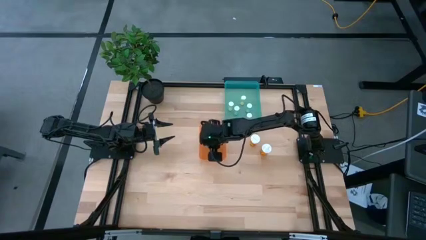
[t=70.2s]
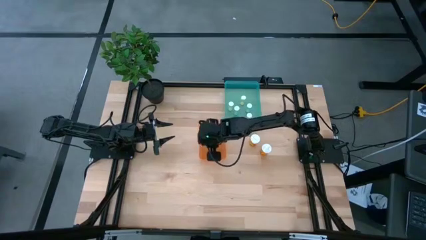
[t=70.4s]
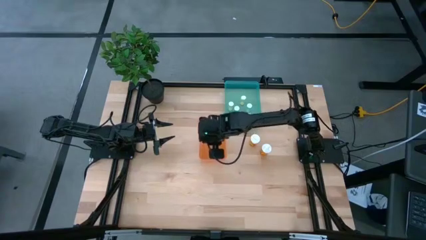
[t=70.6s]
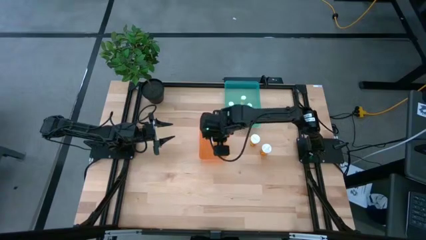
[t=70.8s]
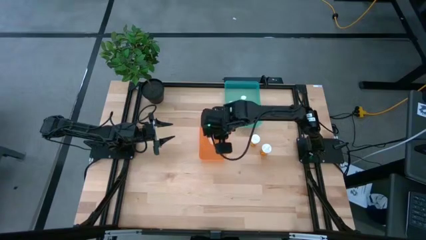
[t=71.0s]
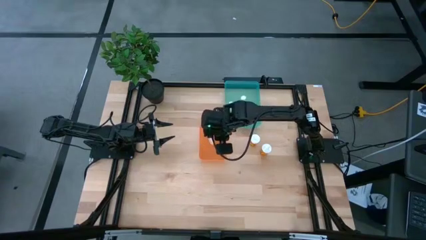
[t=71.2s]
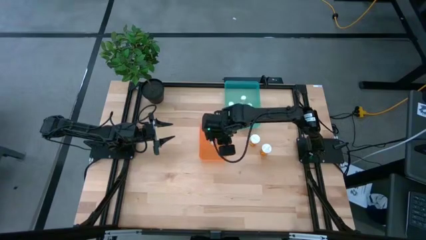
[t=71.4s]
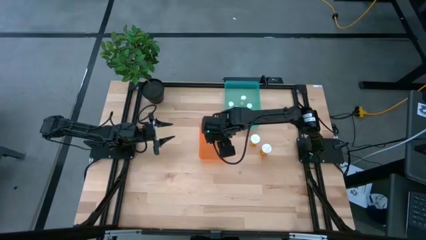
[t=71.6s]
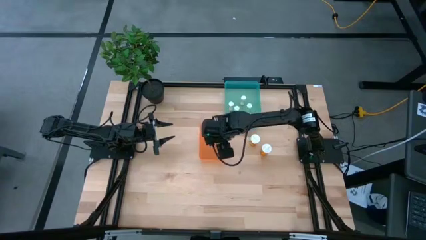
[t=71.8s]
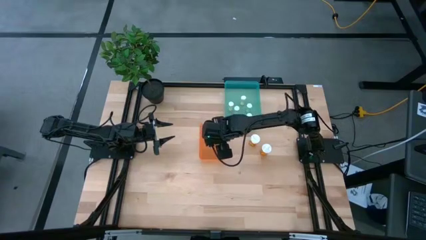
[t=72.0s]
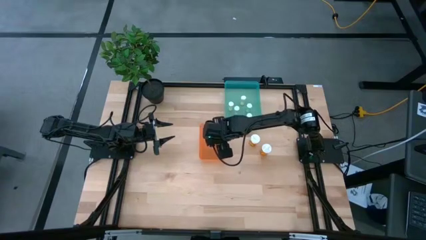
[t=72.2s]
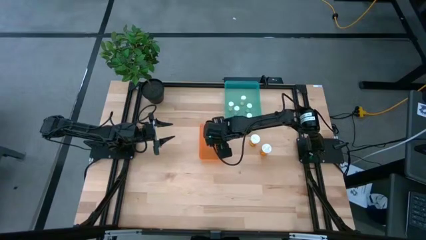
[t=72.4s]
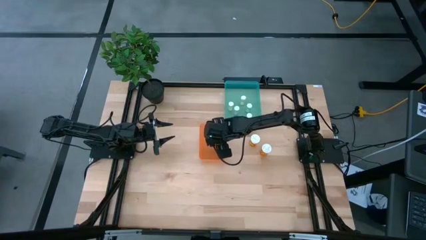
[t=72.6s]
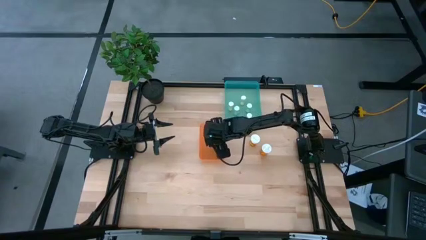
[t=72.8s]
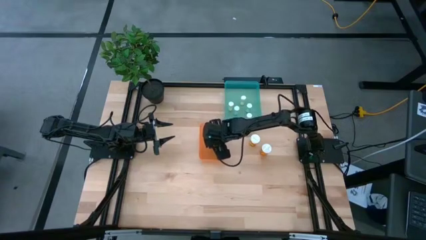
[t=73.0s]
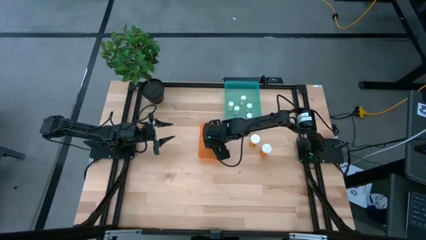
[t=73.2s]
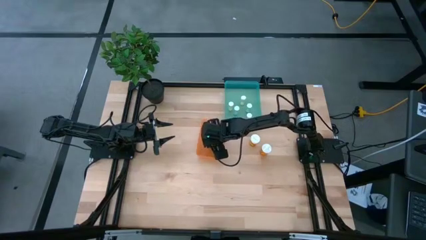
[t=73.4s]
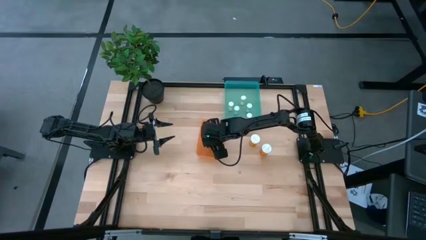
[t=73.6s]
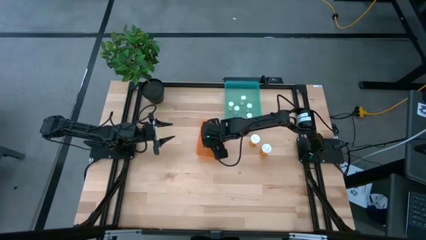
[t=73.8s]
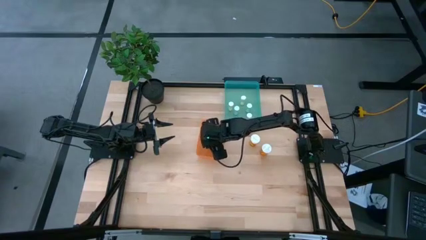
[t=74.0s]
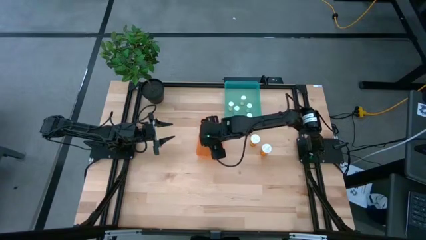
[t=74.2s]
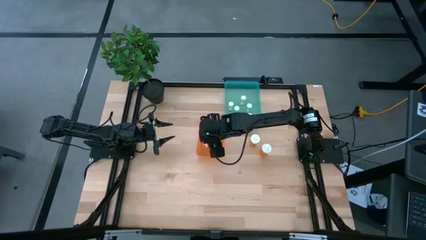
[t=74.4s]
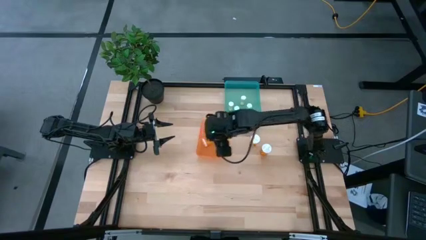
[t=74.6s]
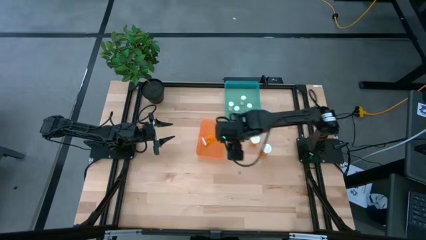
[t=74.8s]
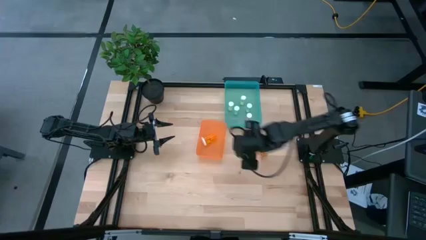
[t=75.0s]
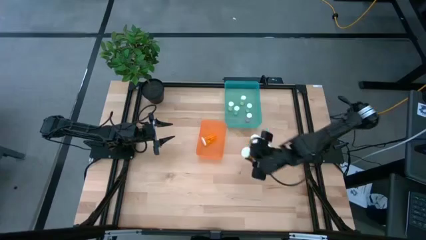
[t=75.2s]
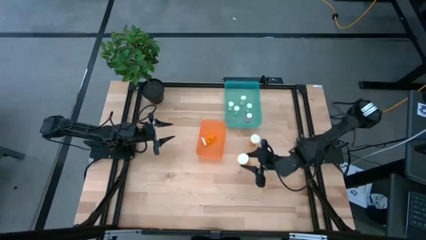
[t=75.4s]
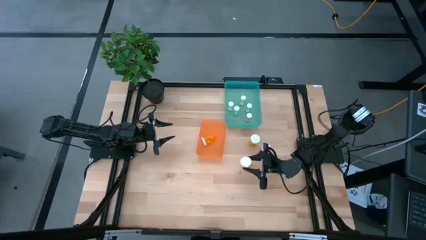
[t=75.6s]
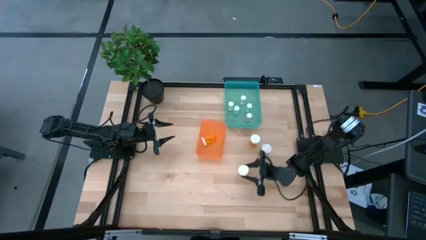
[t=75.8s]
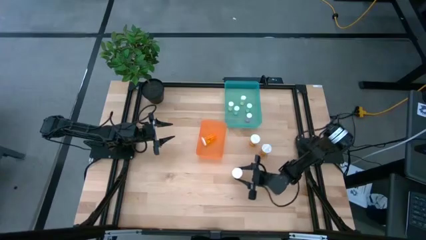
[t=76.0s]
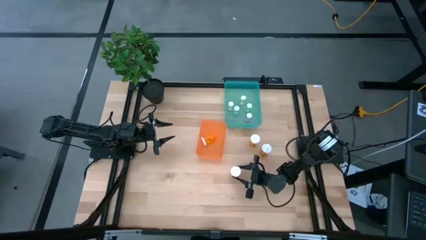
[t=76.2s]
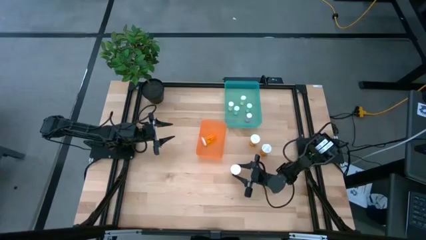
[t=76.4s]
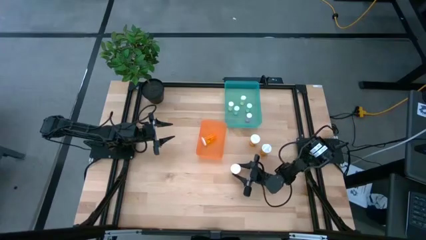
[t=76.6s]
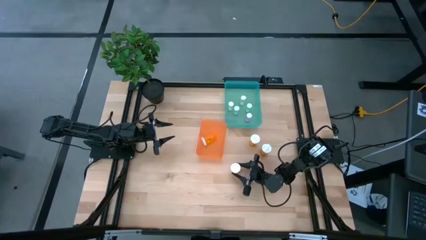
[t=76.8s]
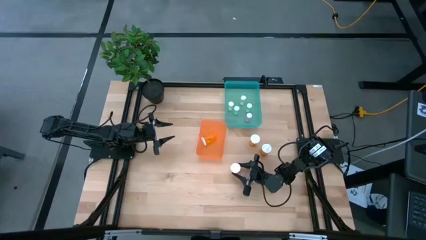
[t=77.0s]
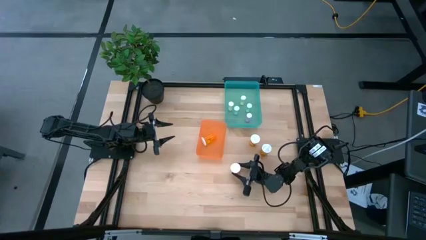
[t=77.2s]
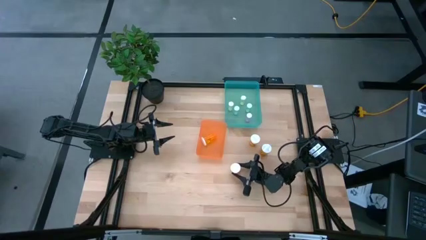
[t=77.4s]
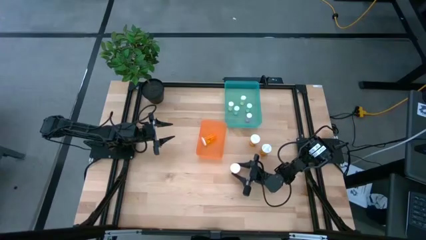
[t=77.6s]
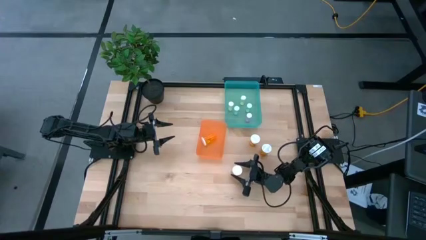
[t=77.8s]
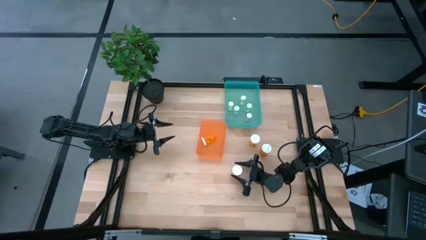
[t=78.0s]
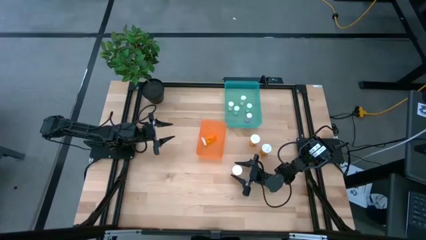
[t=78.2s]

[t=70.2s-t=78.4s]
Task: Pick and place medicine bottles into bin by pill shape (circle, oval)
Remove the orange capsule bottle from the orange bin

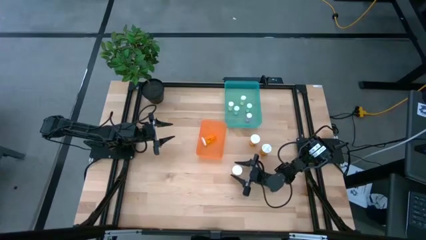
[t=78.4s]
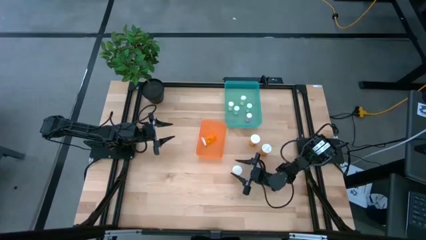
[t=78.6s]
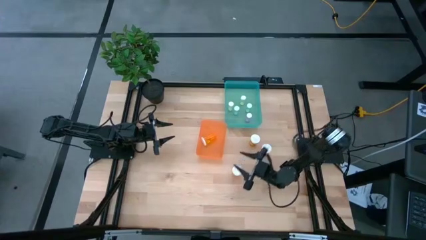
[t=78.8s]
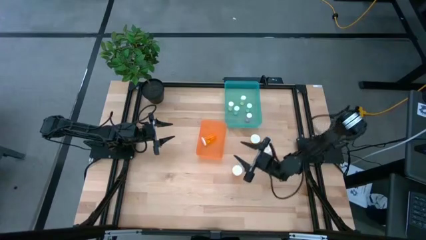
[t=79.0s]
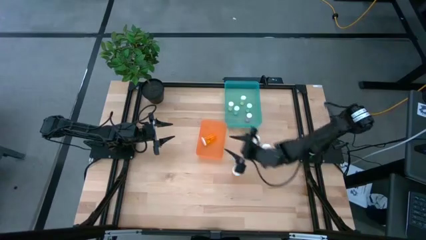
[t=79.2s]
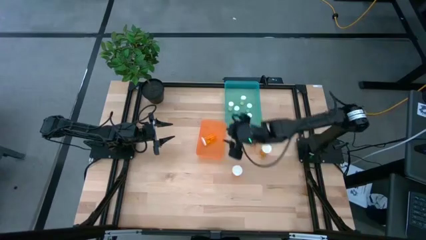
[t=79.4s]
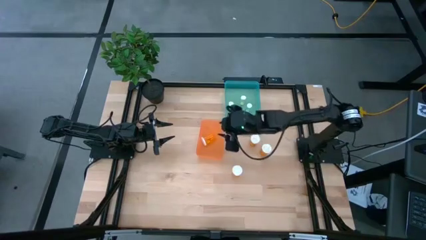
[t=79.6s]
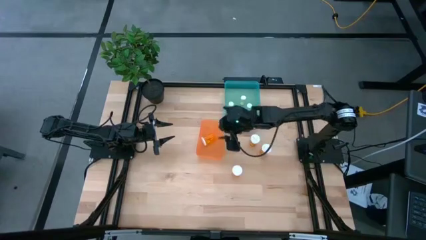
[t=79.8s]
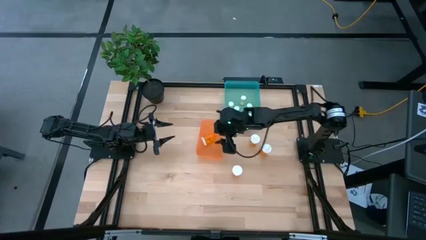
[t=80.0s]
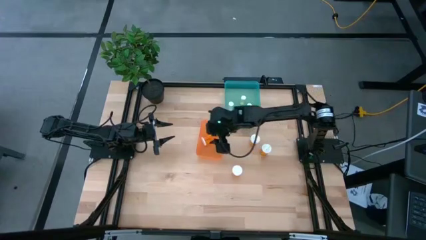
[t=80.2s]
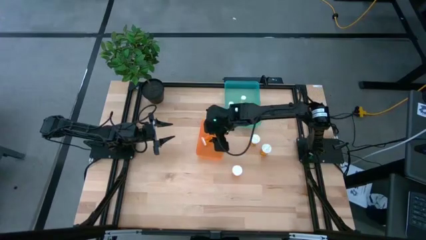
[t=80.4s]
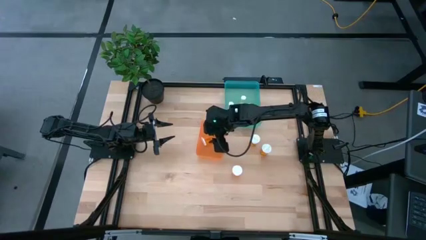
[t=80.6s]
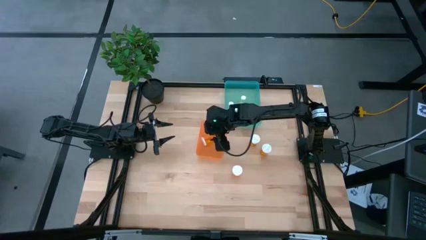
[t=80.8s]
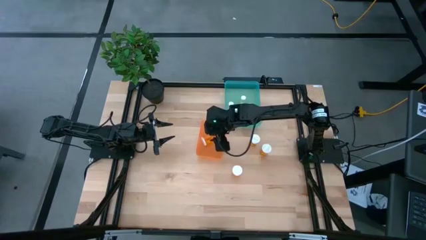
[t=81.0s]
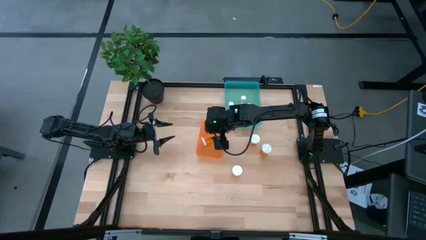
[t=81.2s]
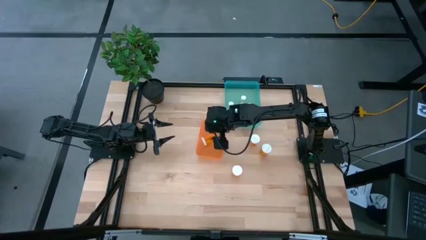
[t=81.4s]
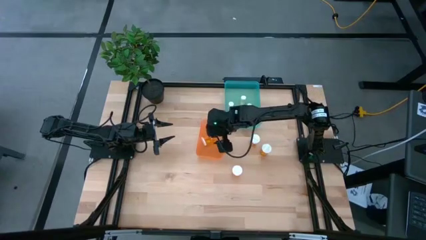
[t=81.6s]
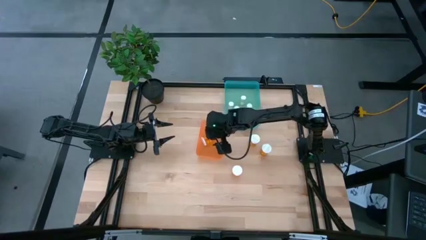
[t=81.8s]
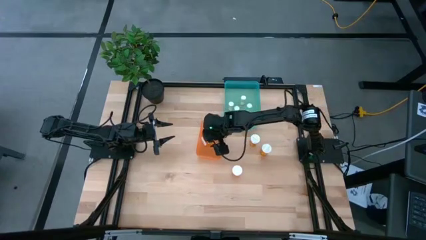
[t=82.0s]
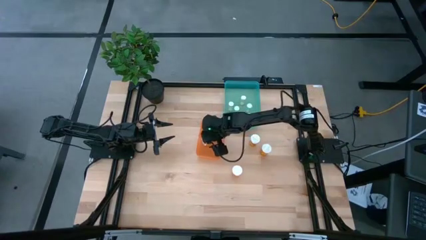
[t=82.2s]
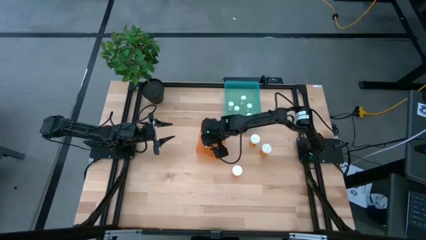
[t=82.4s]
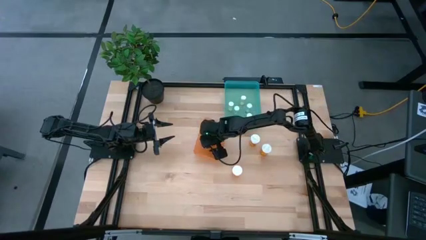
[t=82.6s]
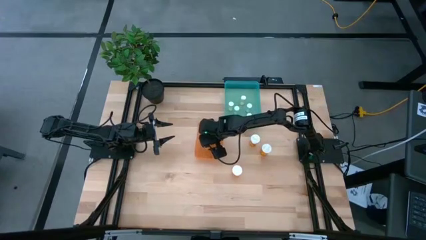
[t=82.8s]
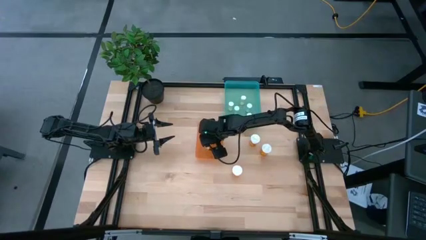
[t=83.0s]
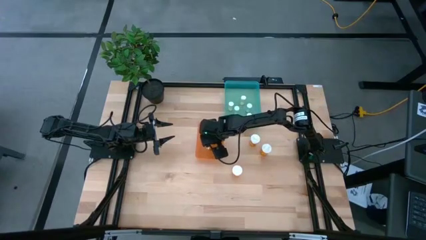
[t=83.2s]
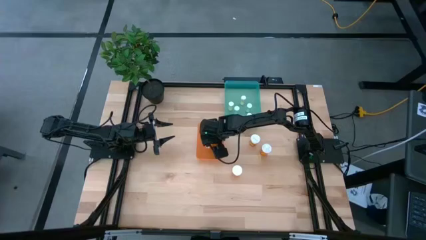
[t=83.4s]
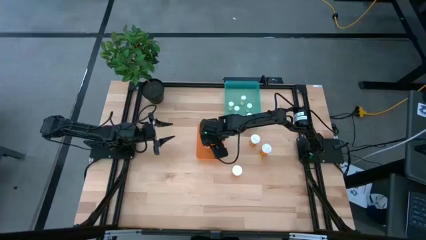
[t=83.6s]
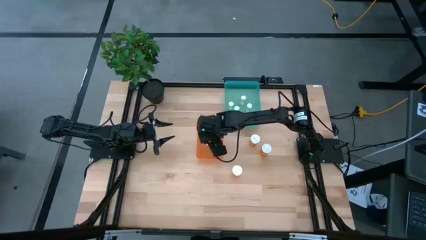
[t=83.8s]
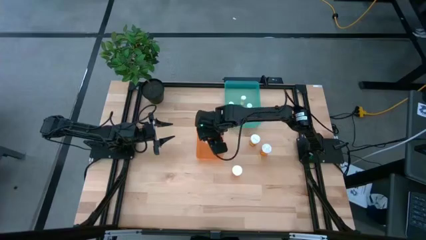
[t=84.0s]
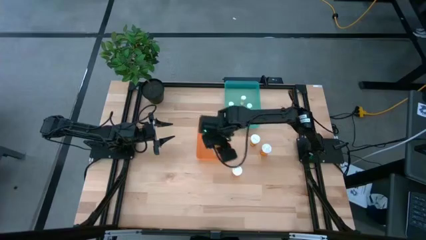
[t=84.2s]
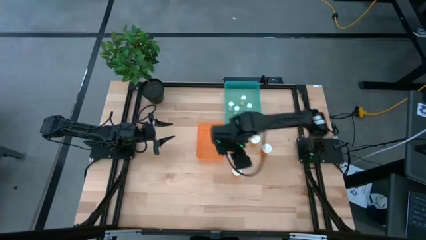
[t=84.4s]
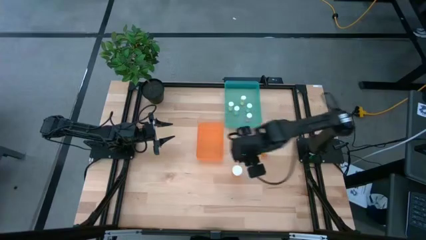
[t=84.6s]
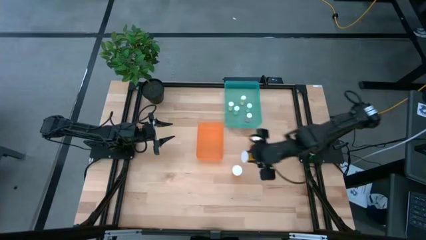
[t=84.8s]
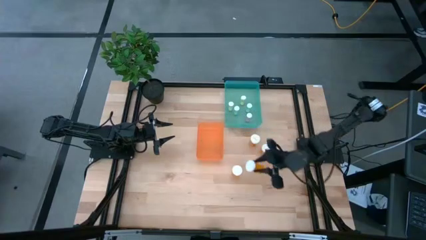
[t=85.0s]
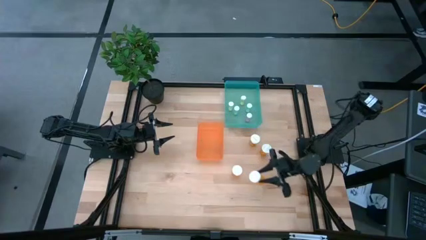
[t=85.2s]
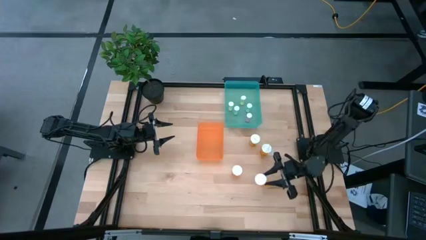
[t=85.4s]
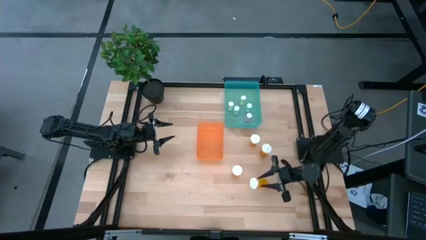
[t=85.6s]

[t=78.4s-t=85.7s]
Remove the orange capsule bottle from the orange bin
